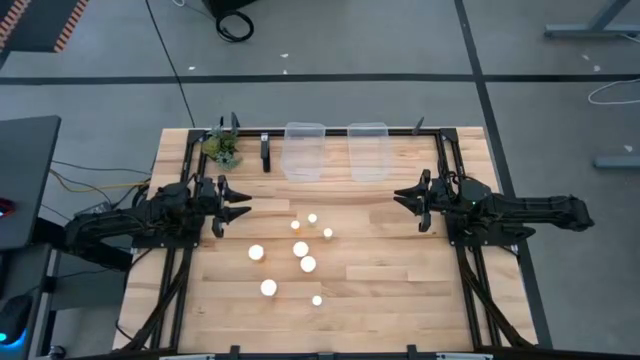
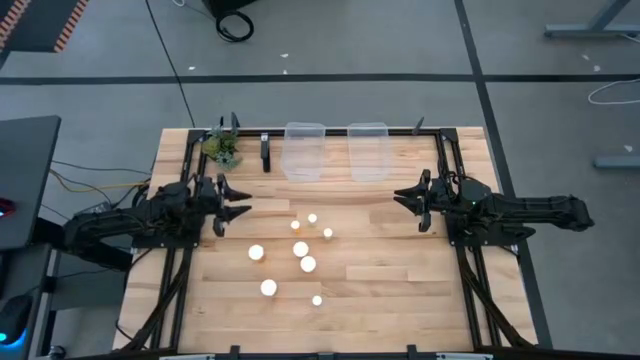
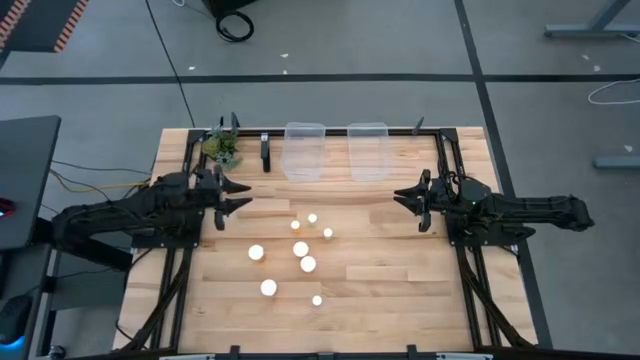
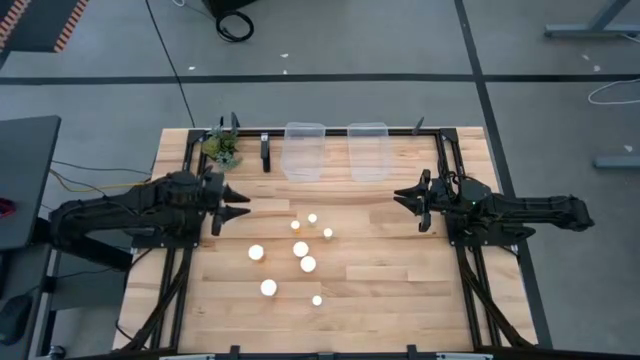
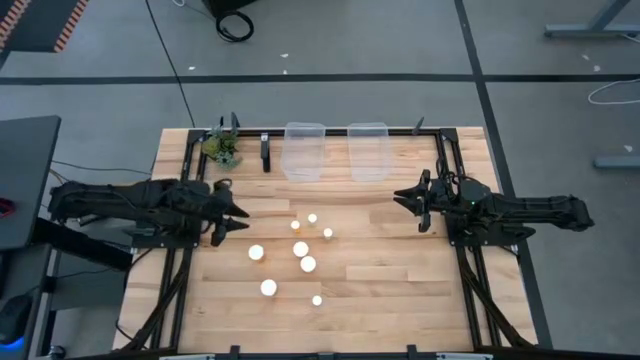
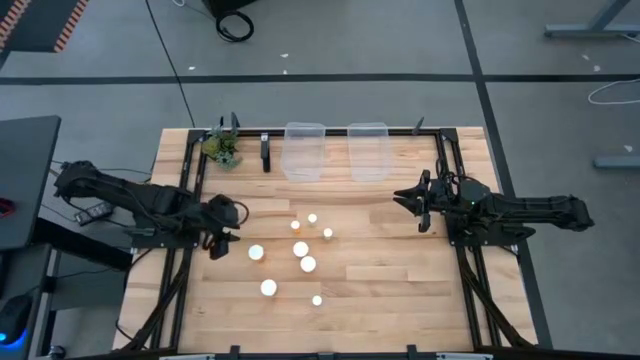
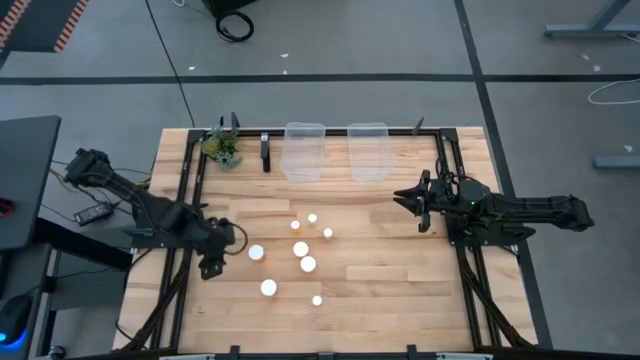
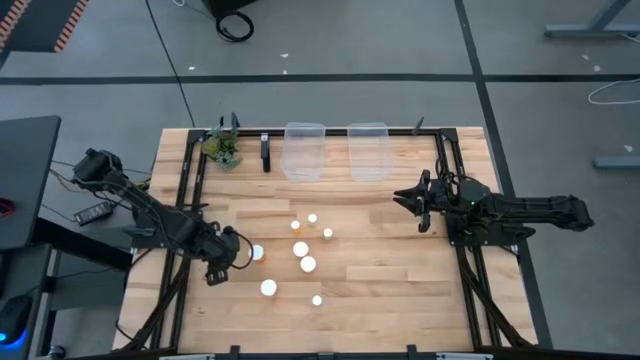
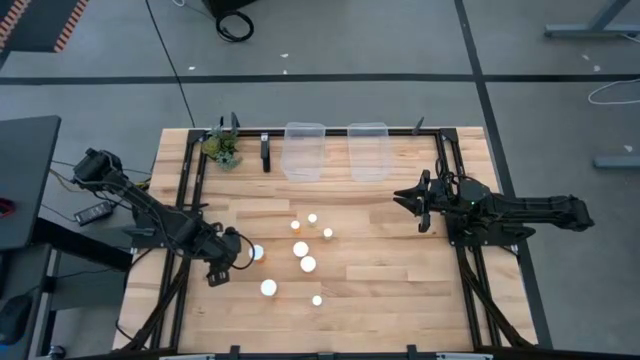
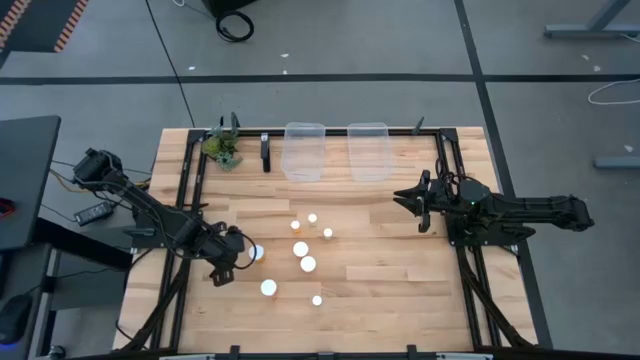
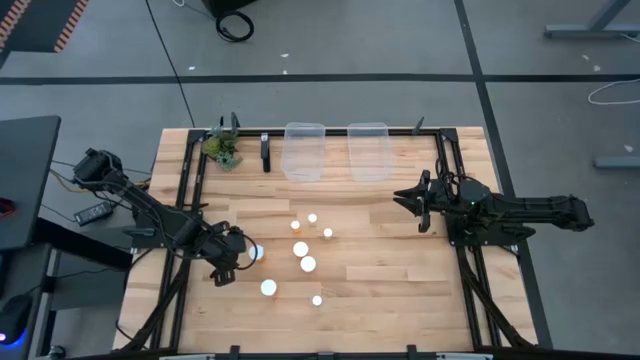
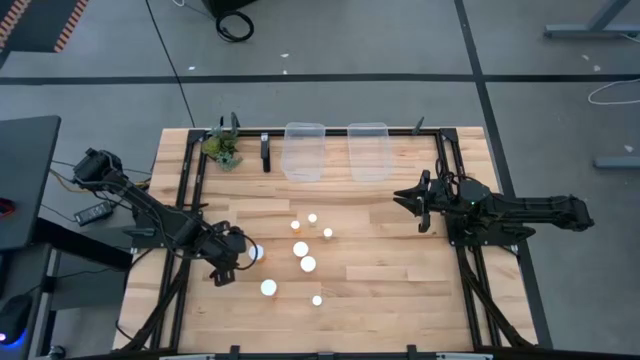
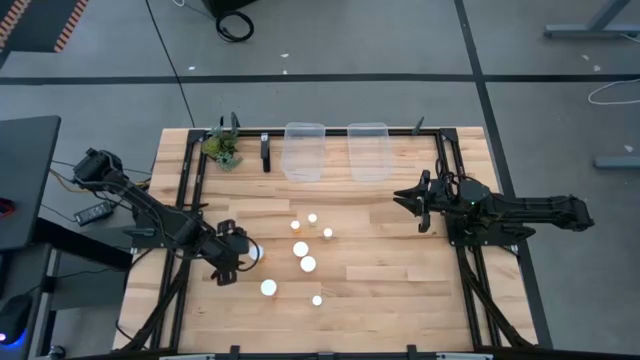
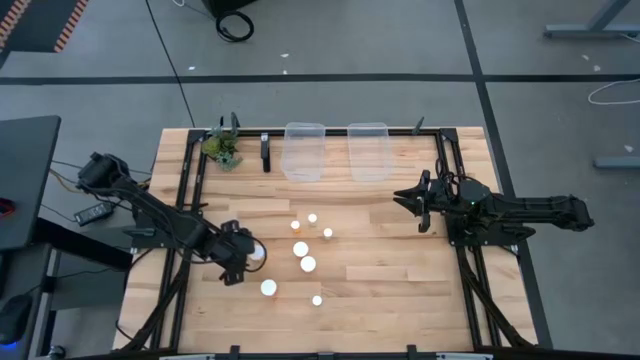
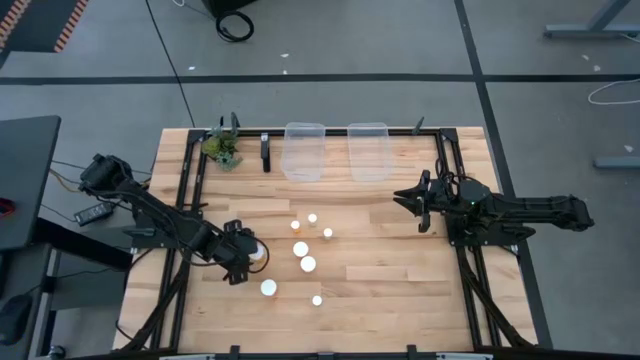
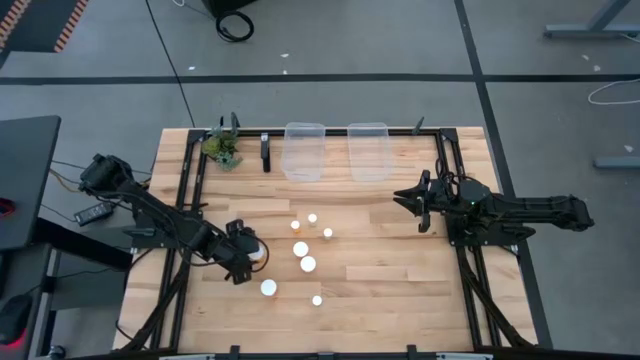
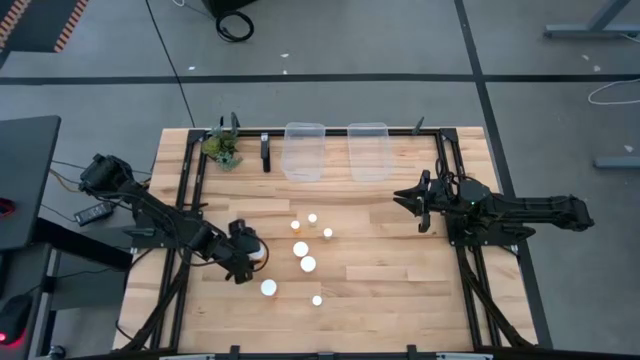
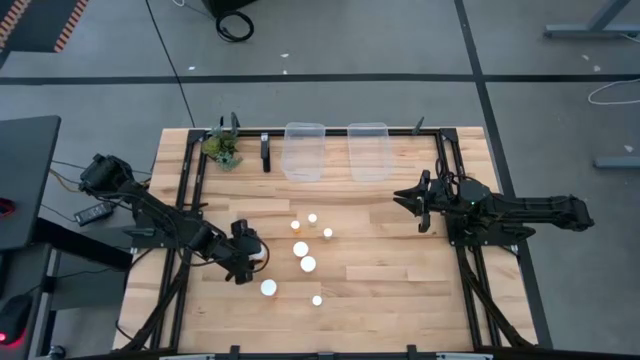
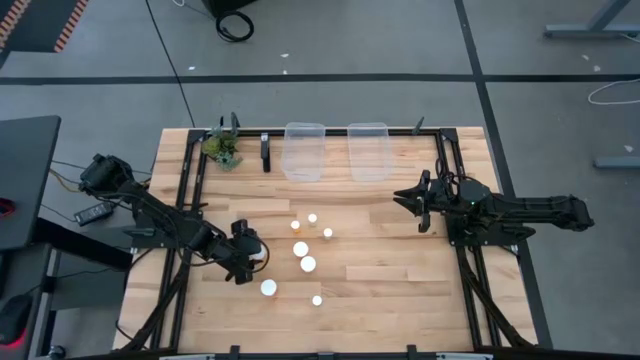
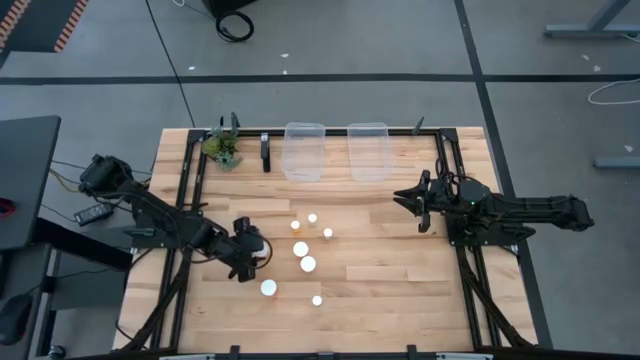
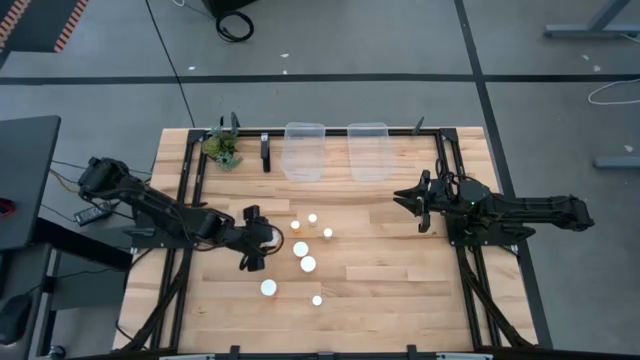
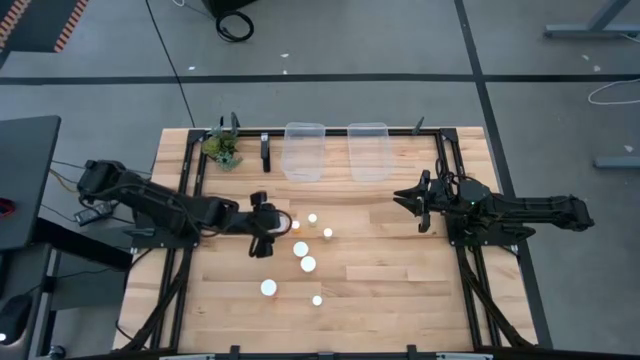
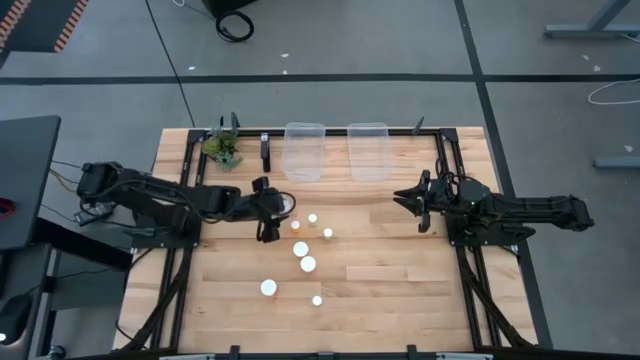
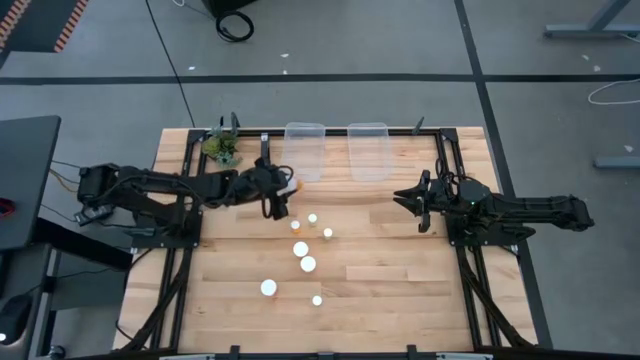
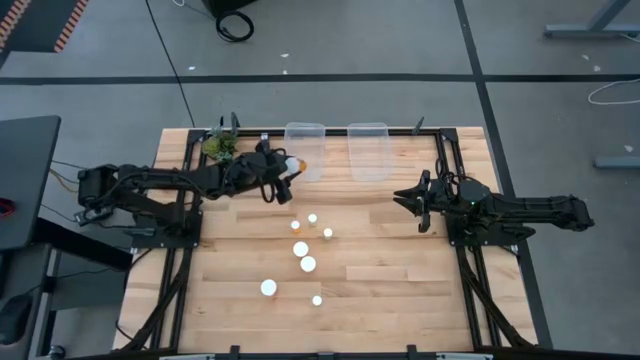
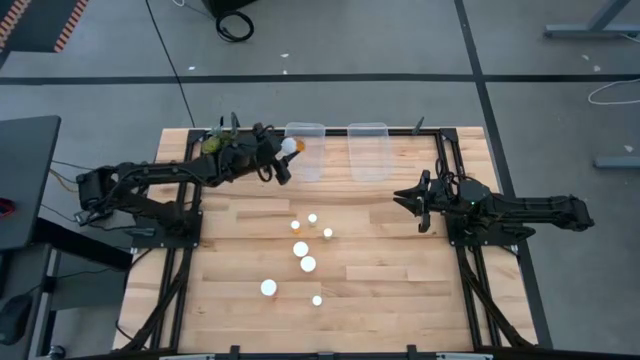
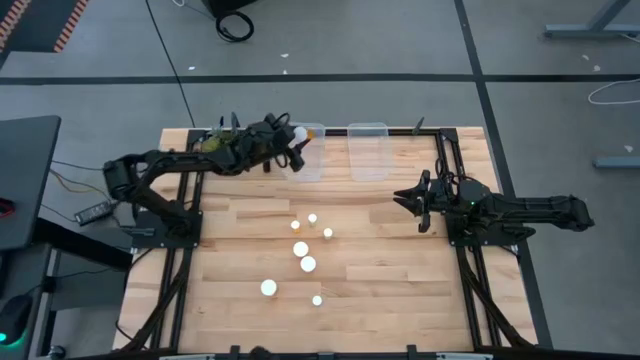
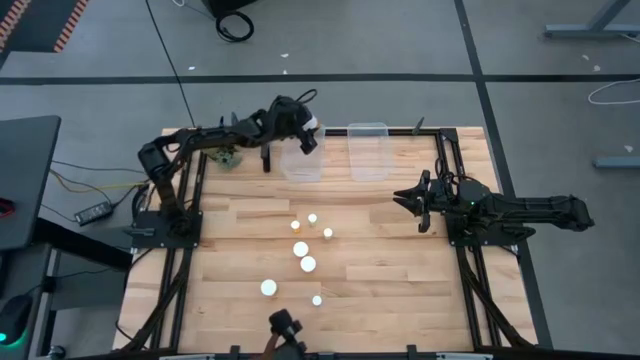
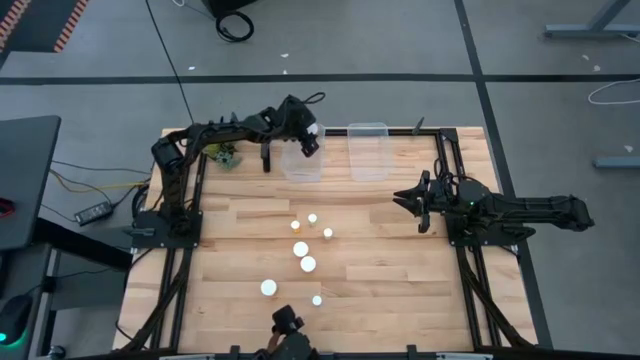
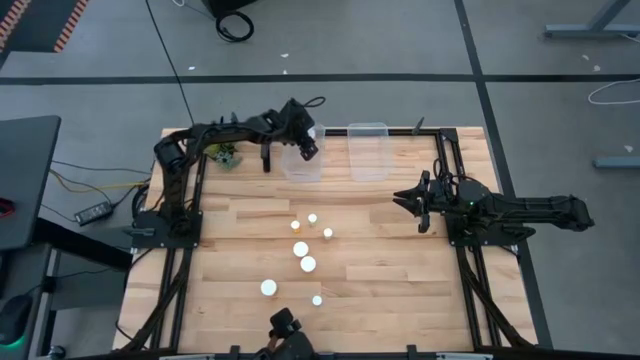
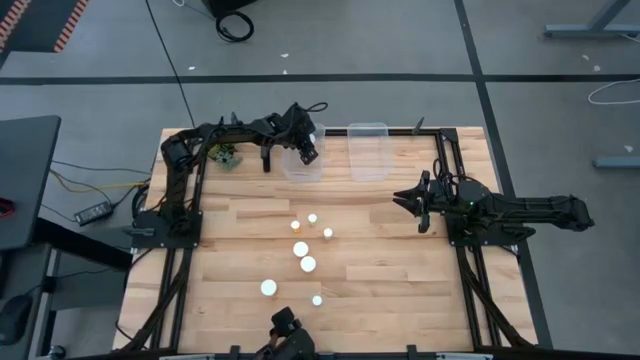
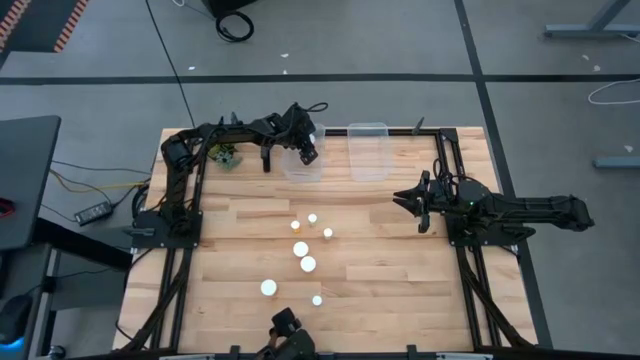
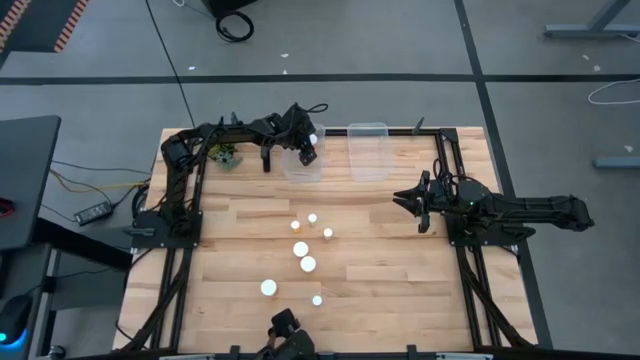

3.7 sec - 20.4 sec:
Task: Pick and place medicine bottles into bin by pill shape (circle, oval)
Put the large orange pill bottle into the left transparent bin

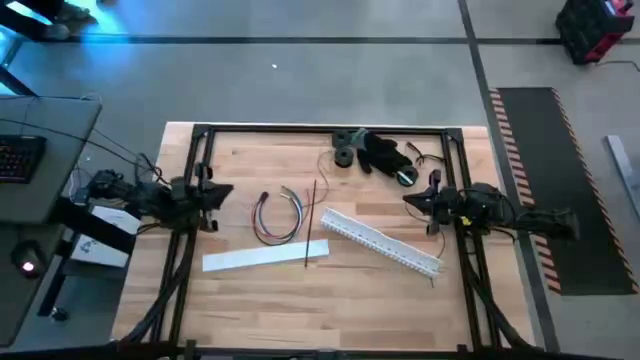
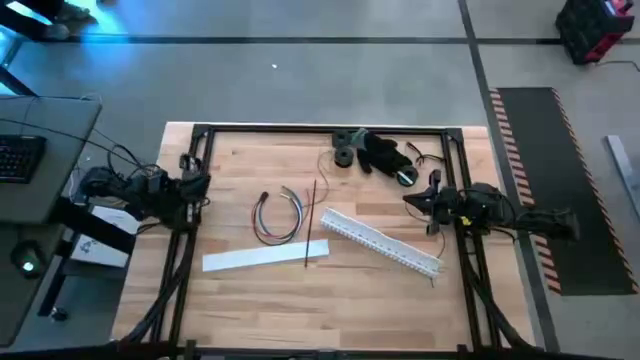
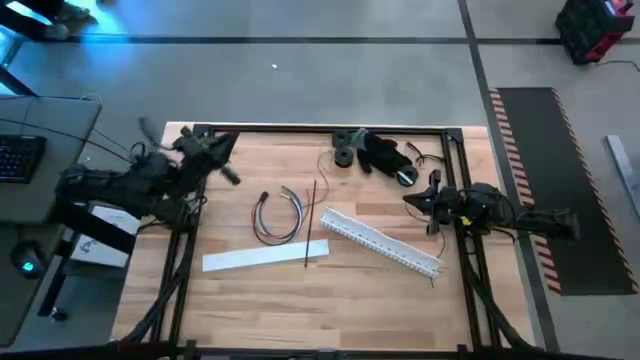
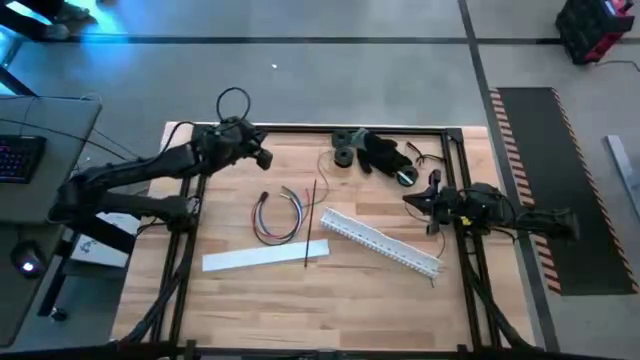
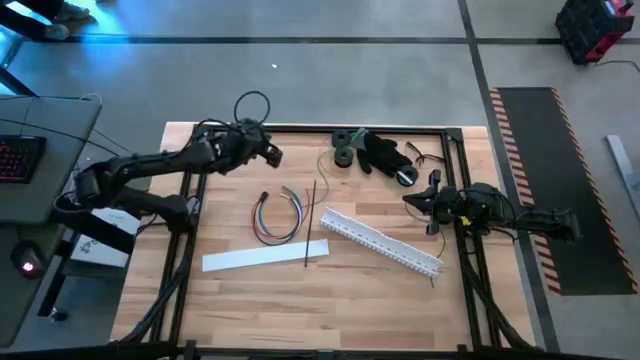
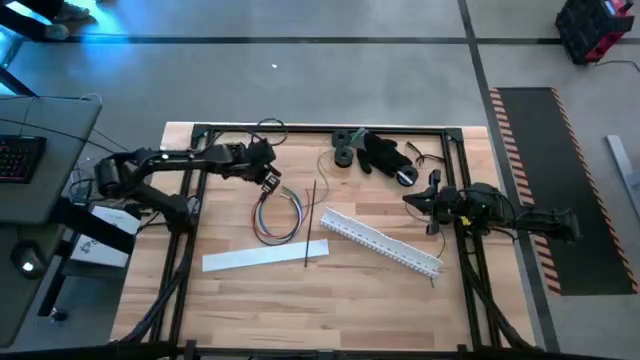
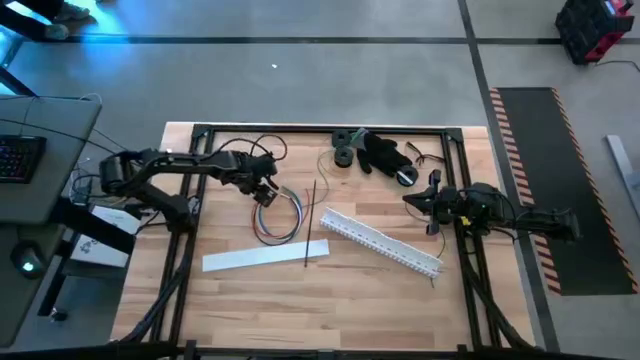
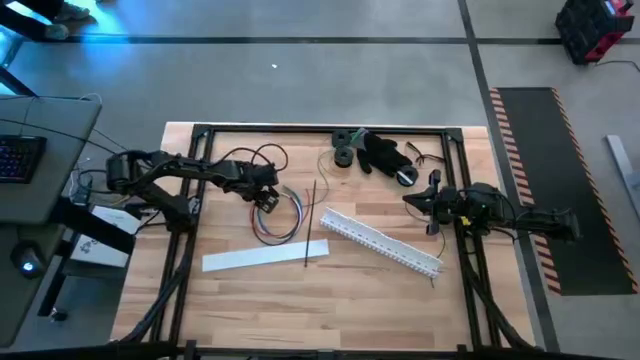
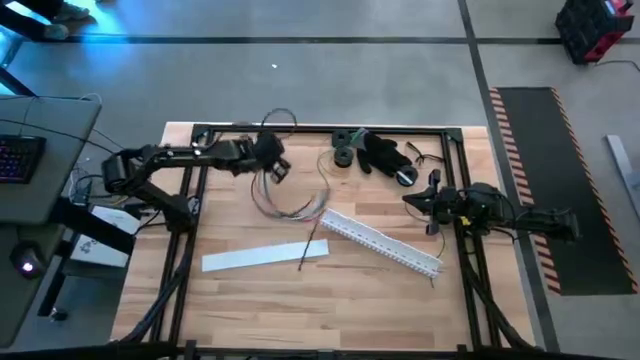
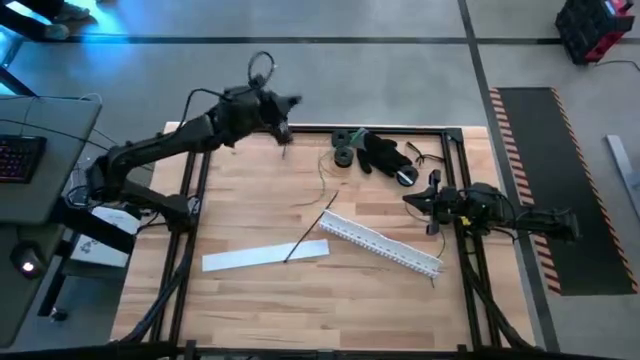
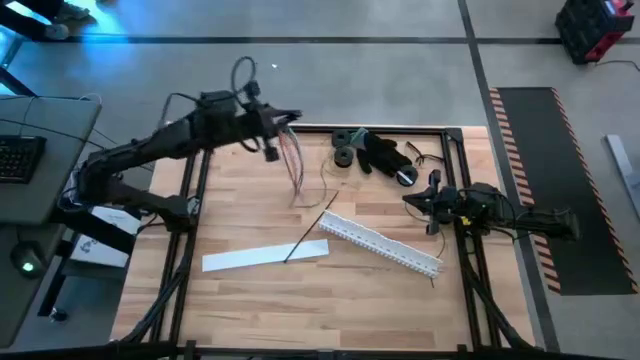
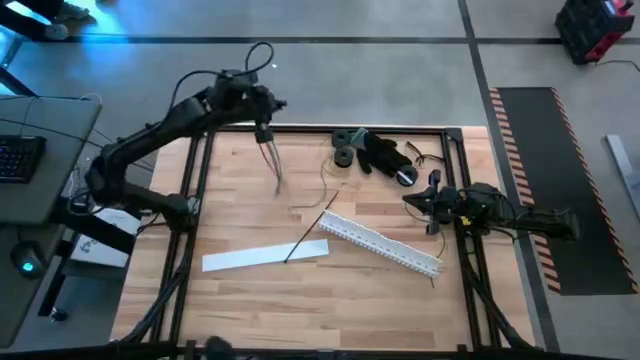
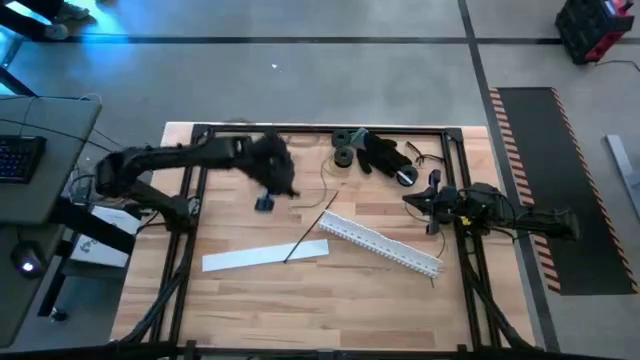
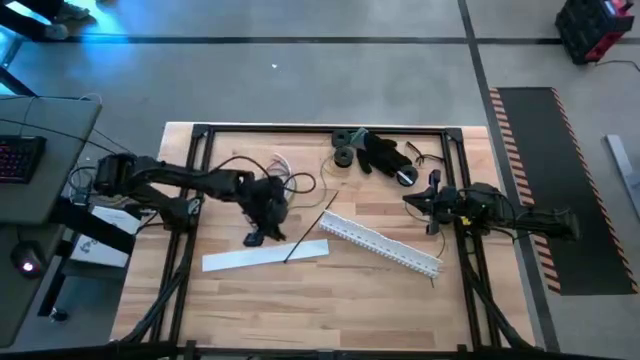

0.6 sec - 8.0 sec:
Task: Ziptie cables
Adjust the cable wires
